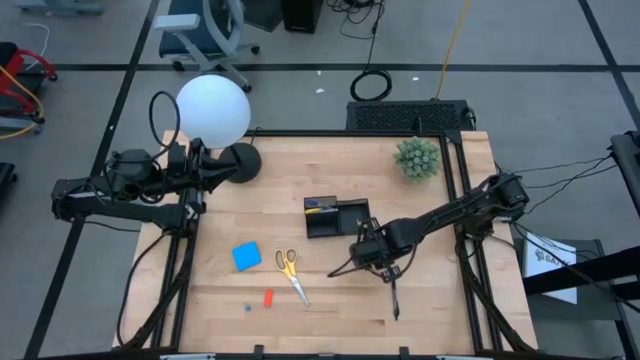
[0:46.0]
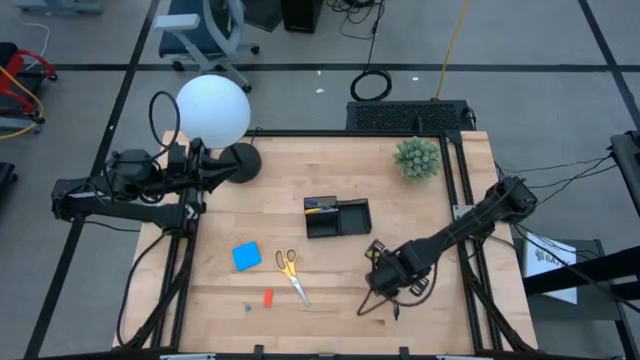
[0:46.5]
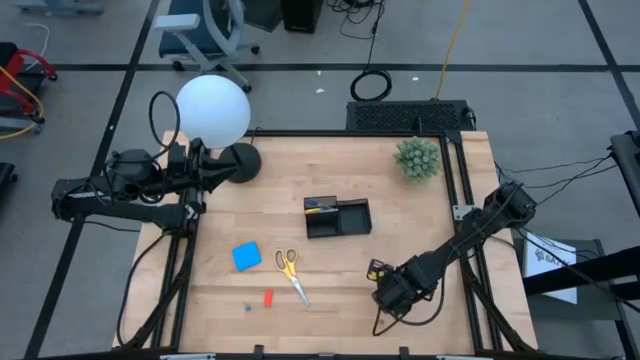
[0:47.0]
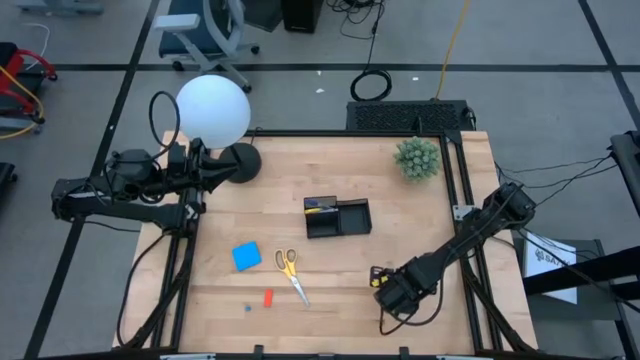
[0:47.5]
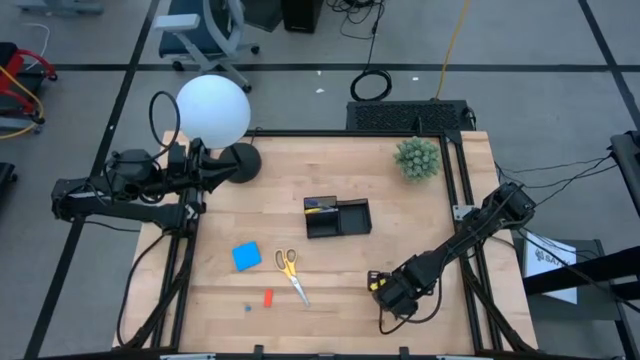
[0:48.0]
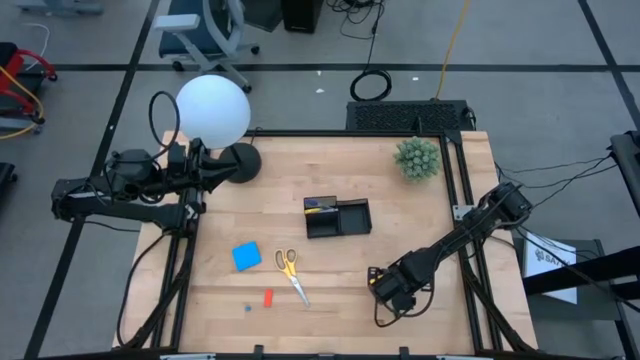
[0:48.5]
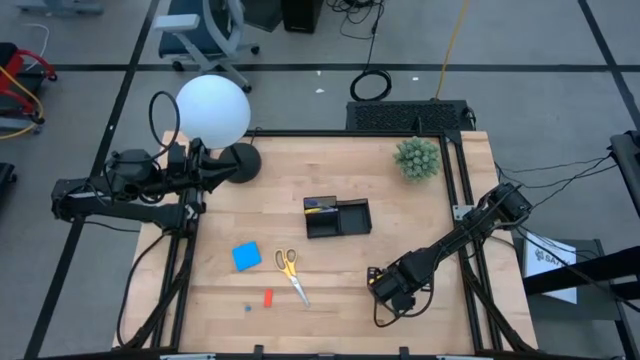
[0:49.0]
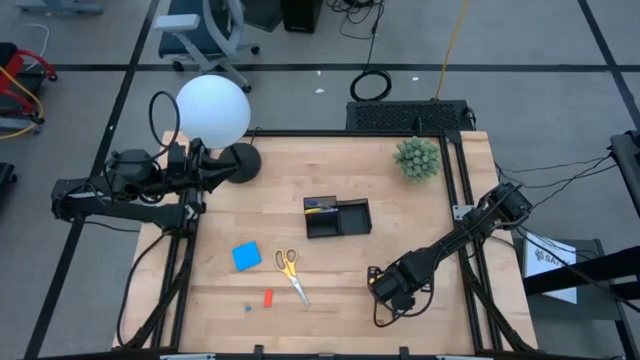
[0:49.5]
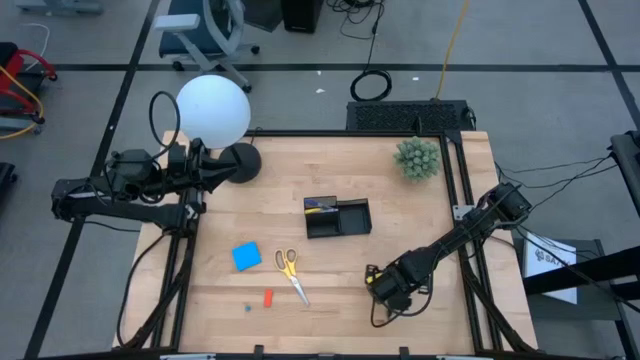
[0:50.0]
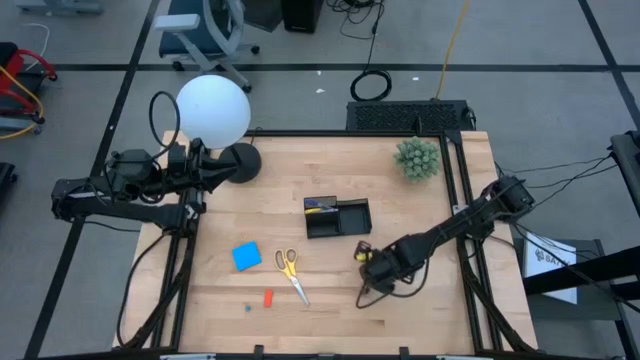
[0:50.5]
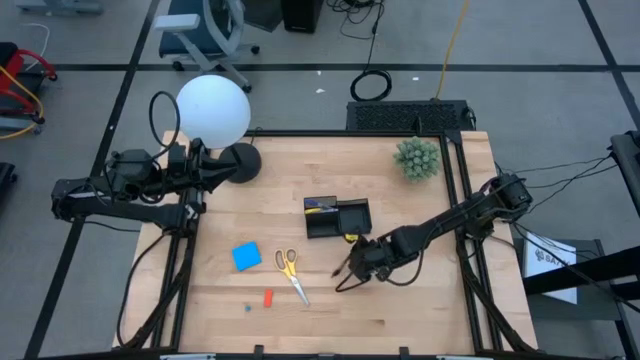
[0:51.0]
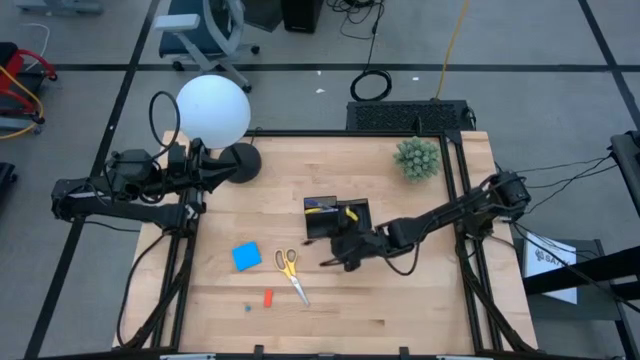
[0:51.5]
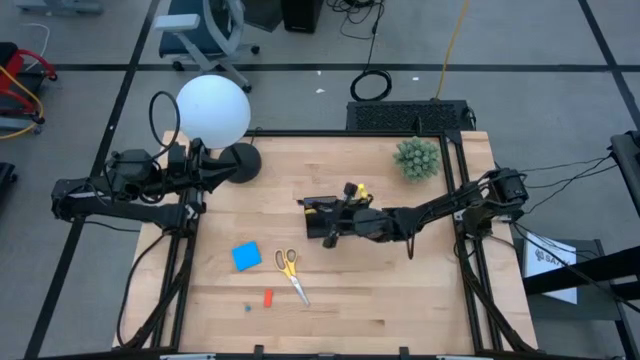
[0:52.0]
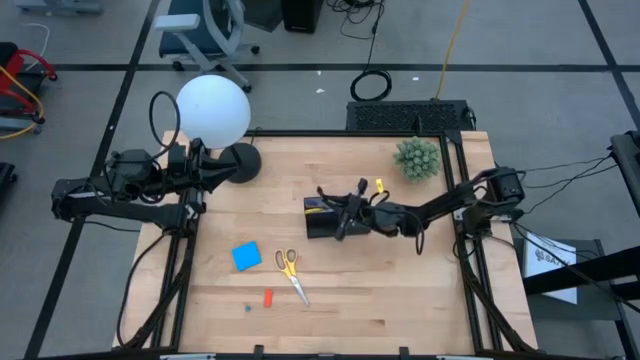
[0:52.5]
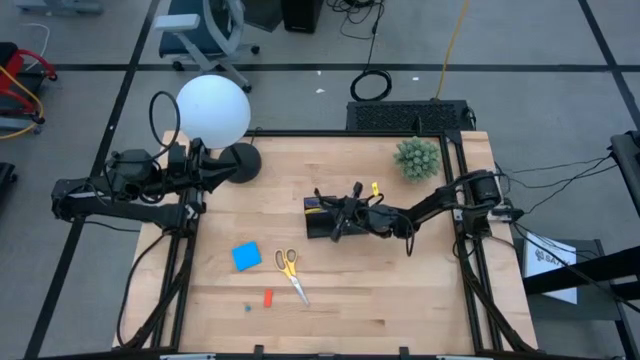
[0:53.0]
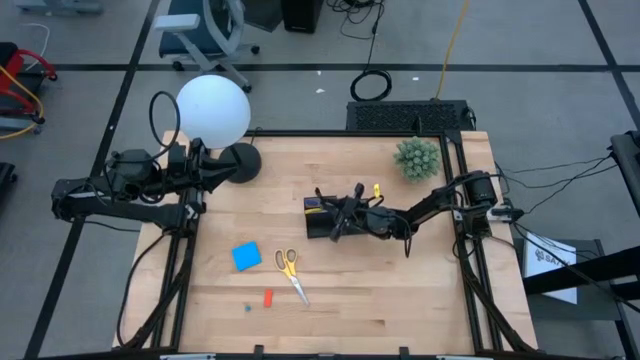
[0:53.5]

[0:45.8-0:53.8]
Task: Pick and place office supplies into organizer
Put the black pen into the top left compartment of the black desk organizer

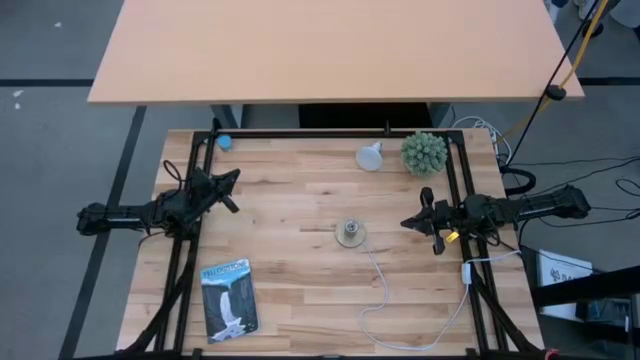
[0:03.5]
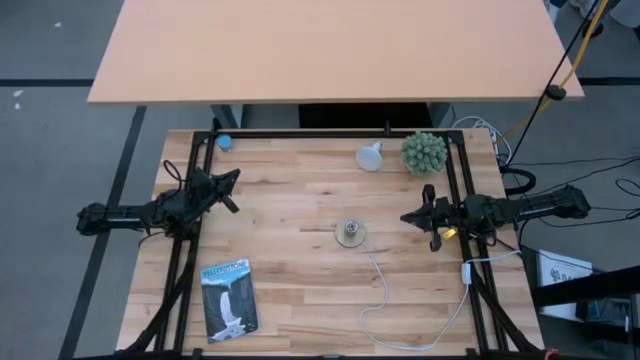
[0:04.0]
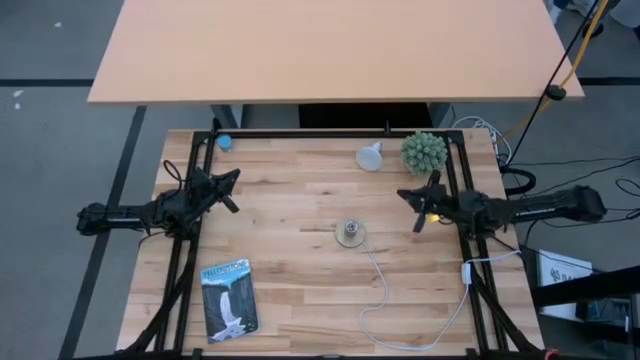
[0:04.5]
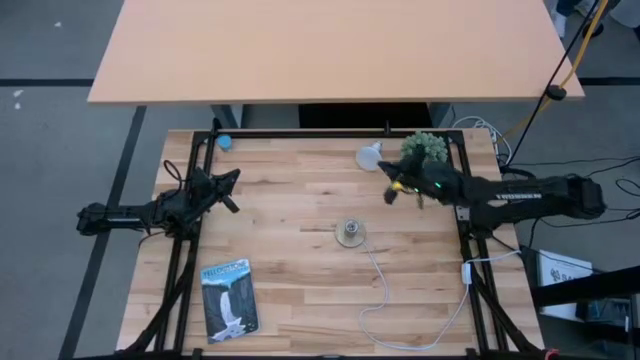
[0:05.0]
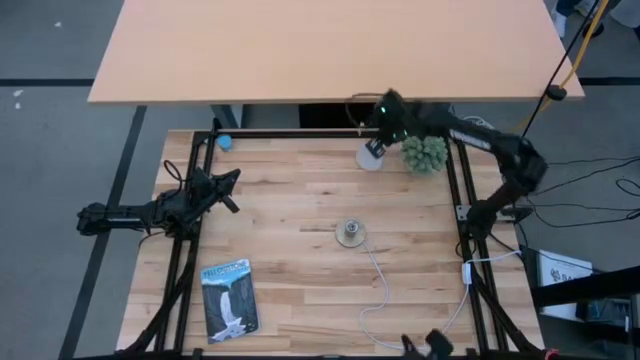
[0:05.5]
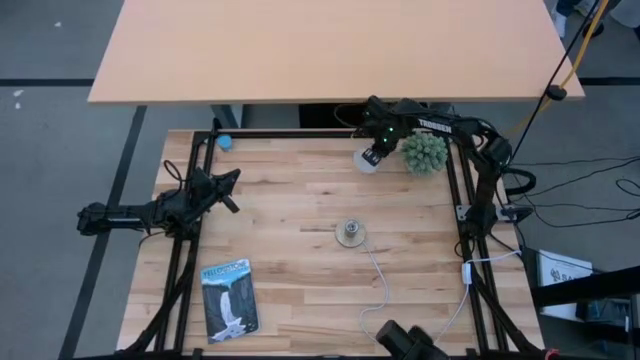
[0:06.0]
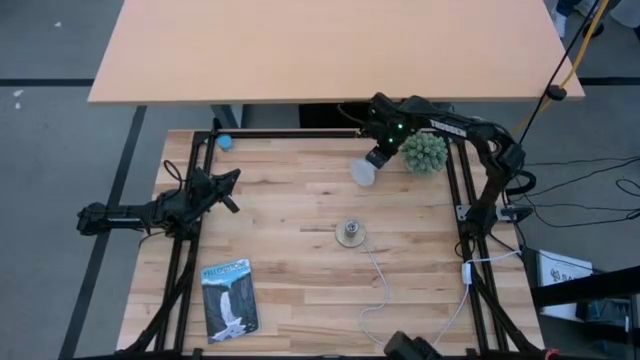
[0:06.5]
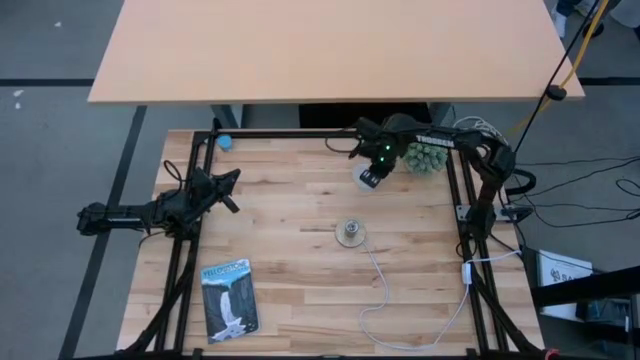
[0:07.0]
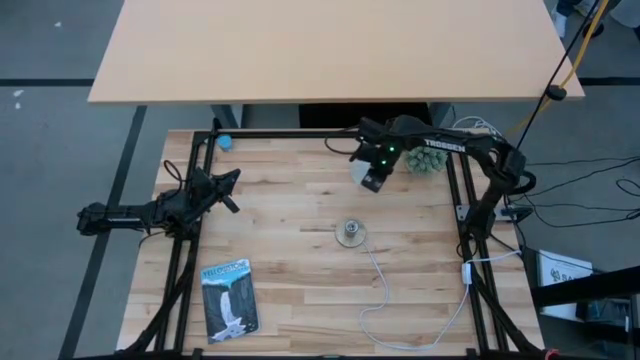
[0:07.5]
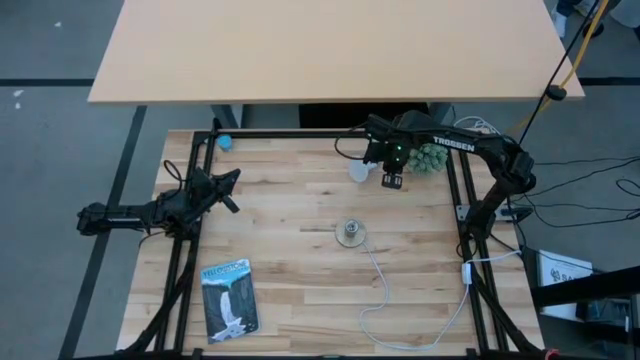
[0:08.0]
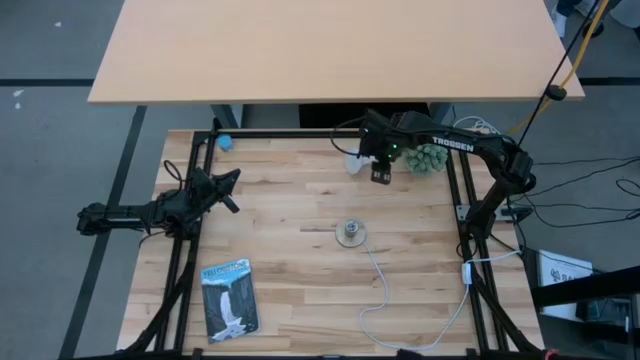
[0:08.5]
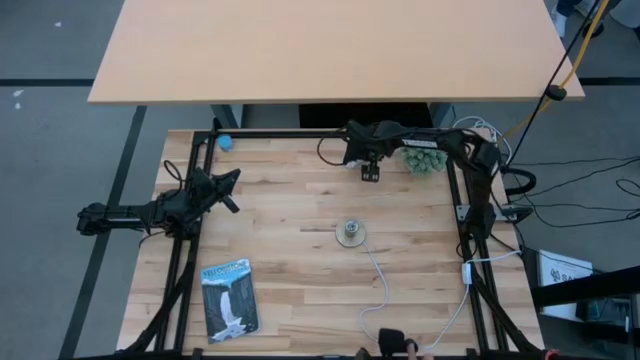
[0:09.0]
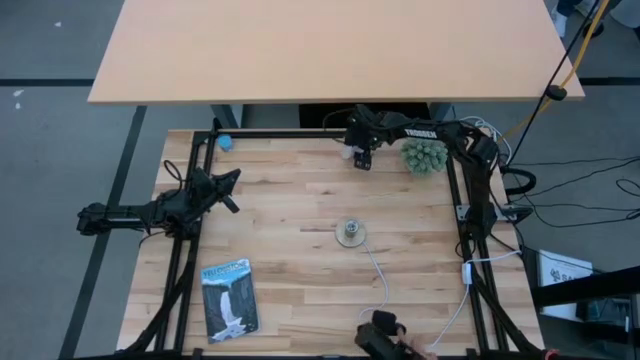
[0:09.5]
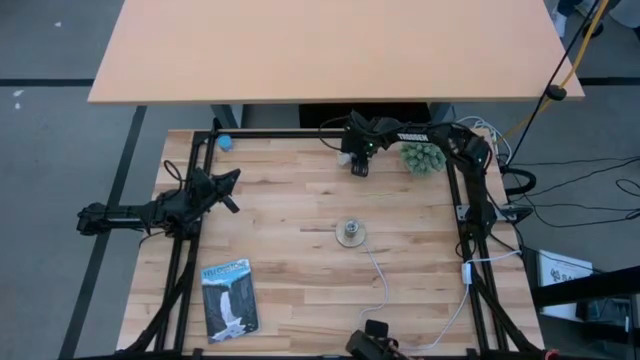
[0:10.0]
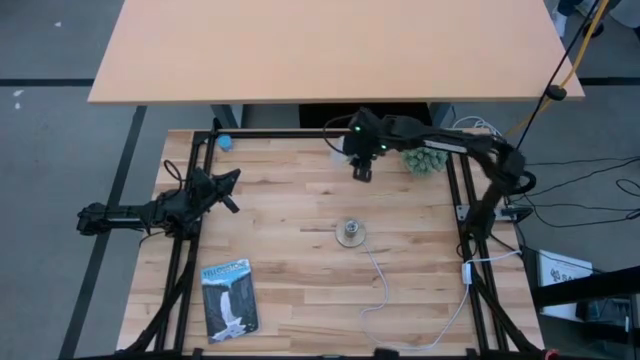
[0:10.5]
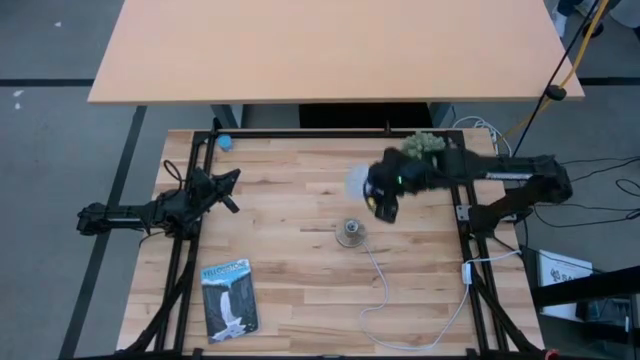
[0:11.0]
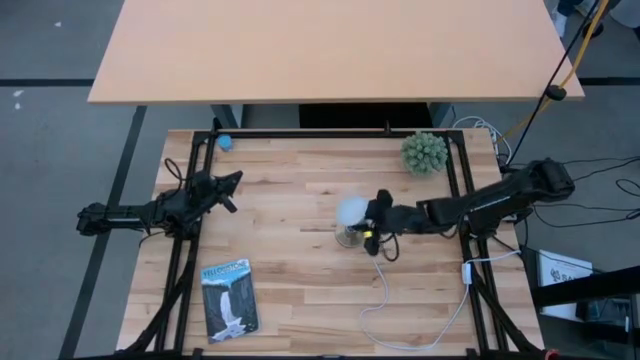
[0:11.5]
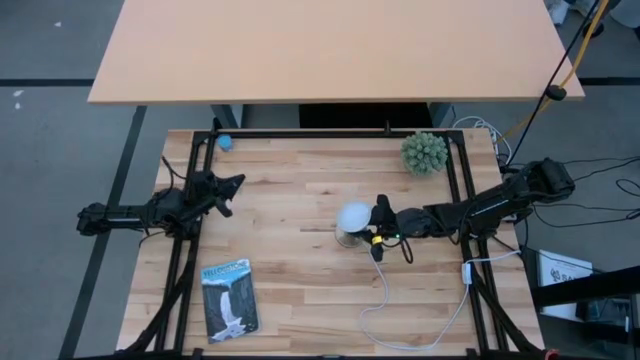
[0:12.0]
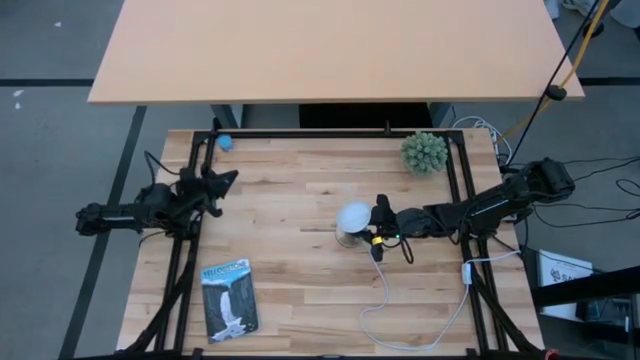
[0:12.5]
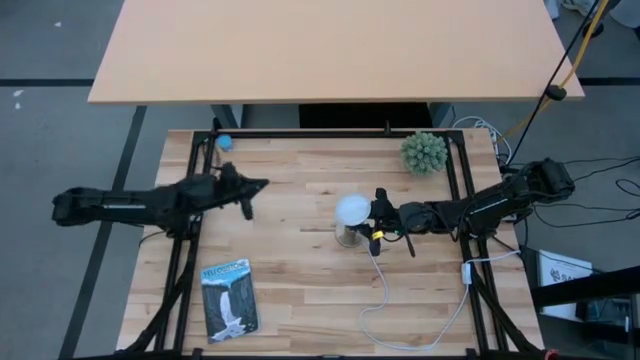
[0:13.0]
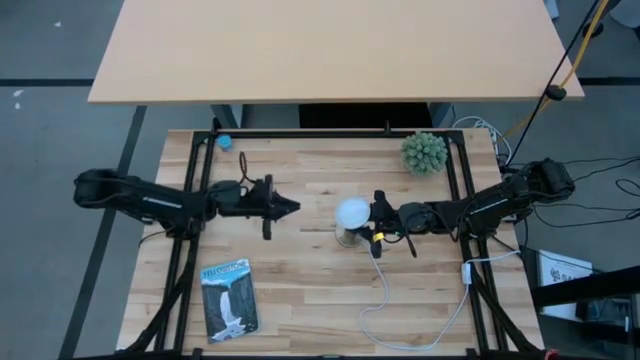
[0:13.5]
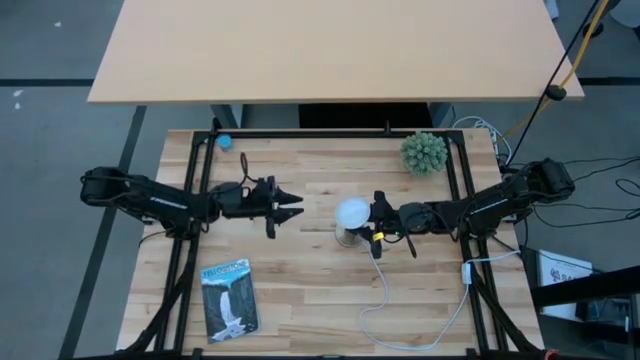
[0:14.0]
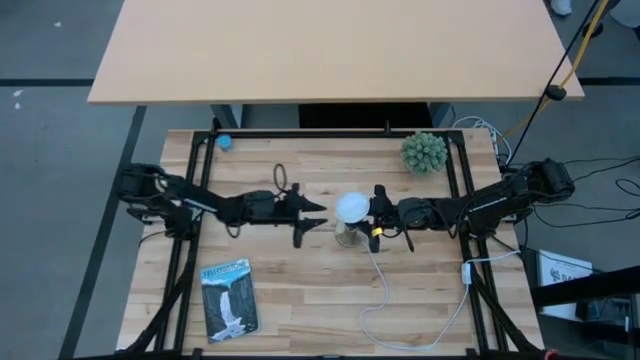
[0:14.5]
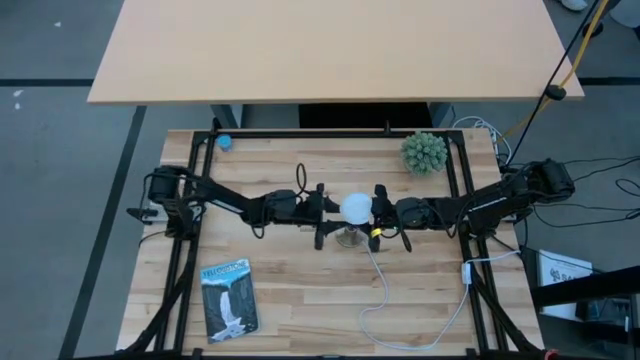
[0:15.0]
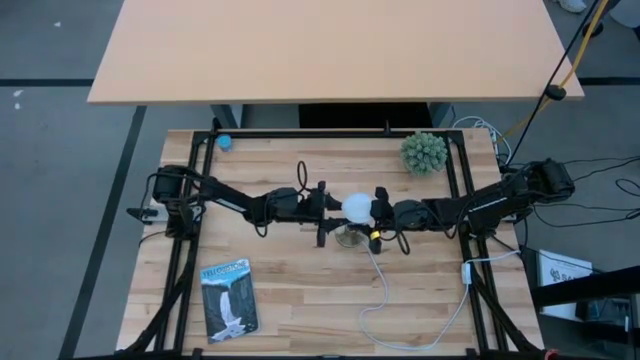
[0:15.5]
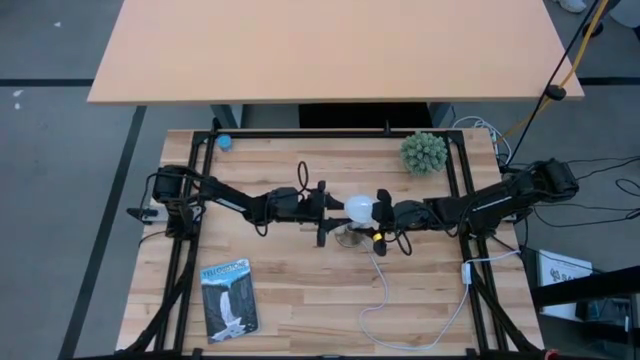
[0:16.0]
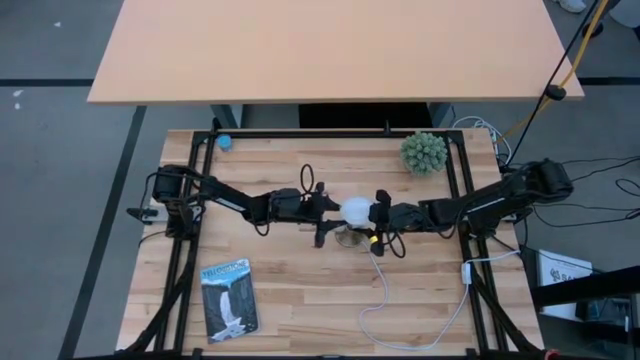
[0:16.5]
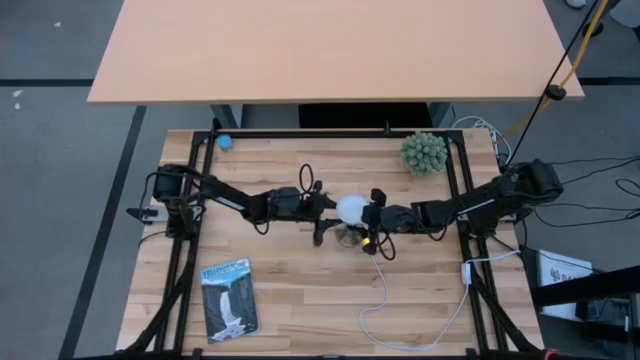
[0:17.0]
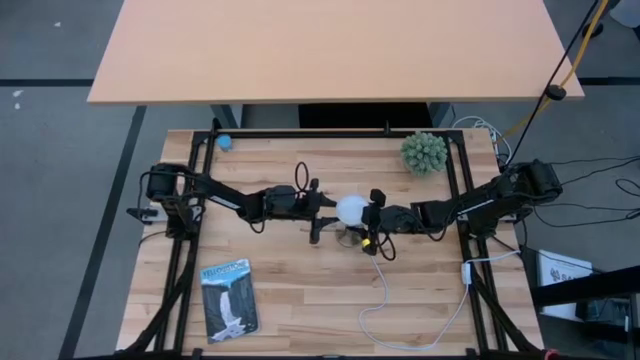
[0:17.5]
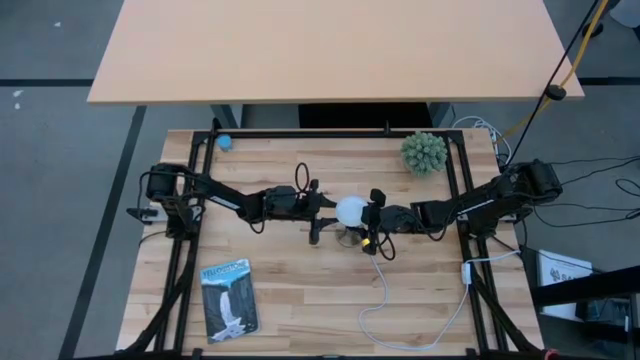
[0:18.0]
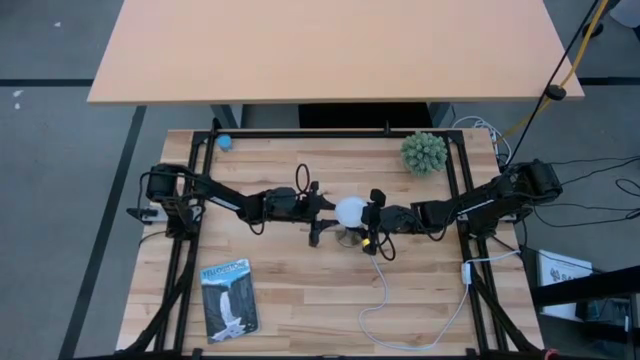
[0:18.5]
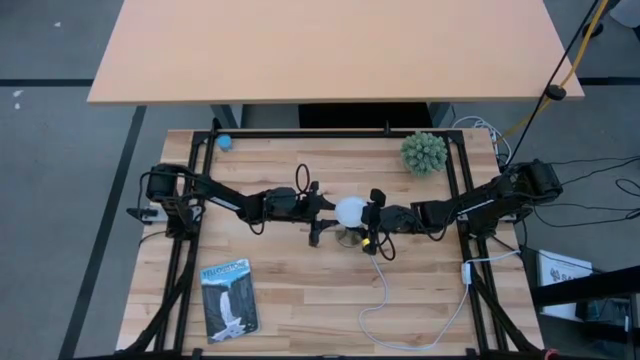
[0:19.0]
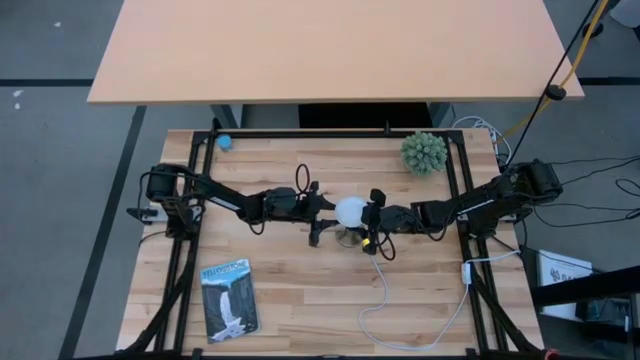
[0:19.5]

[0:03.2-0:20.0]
Task: Screw lightbulb
Insert the lightbulb into the lamp
